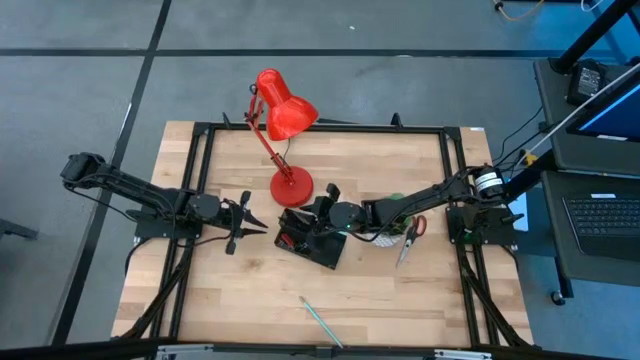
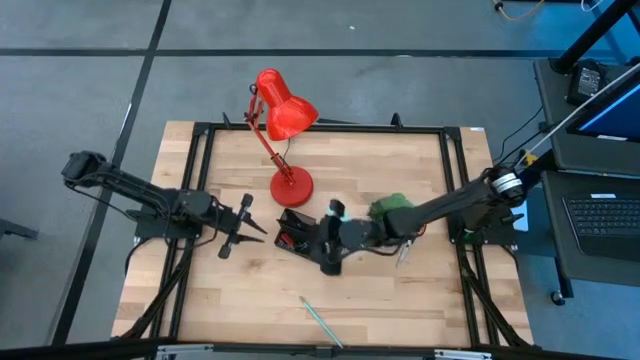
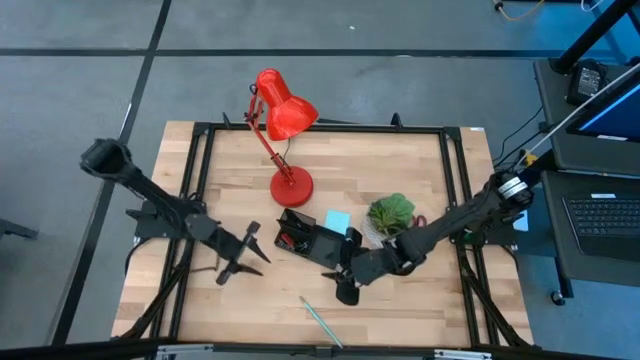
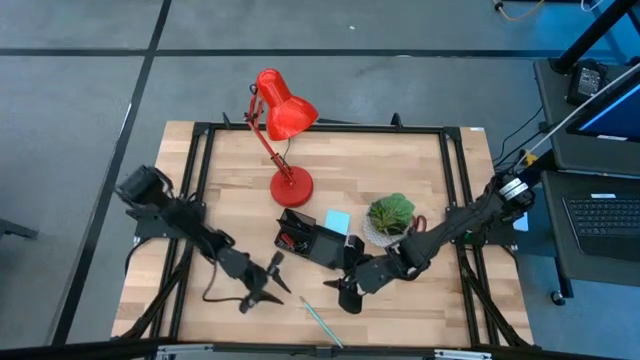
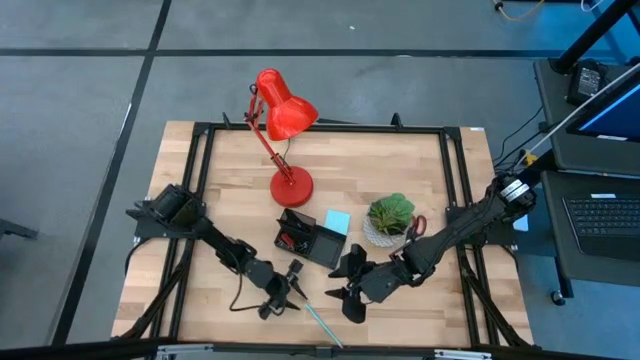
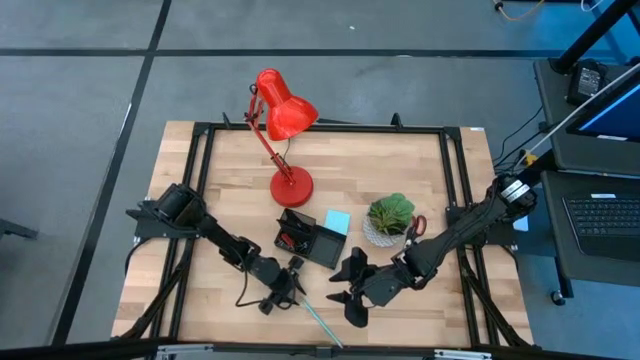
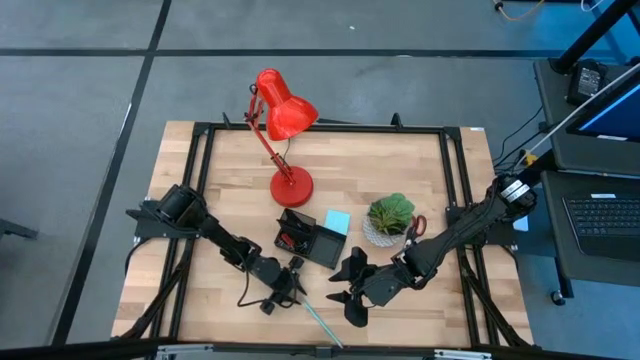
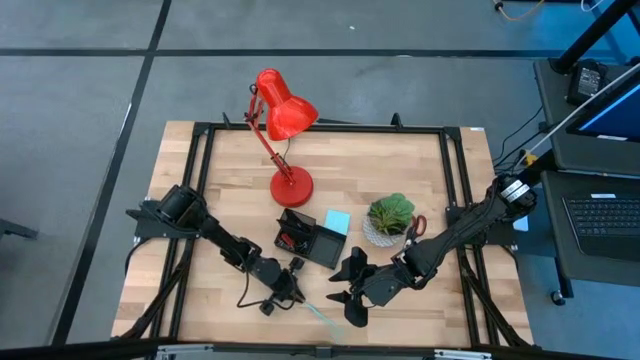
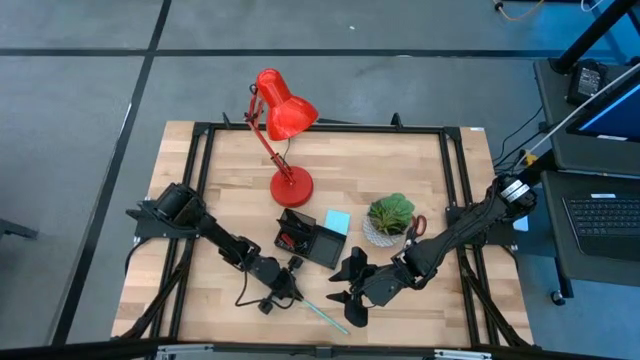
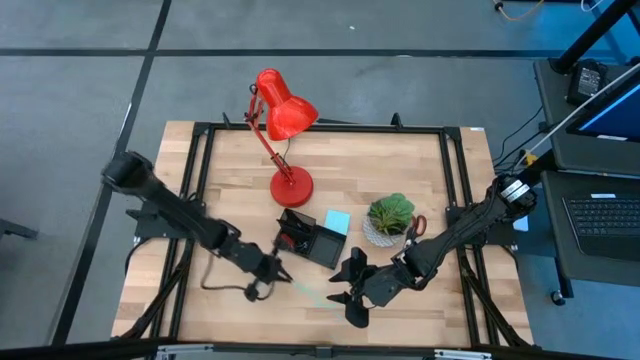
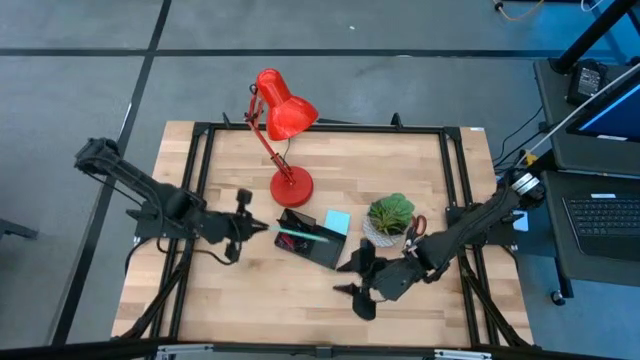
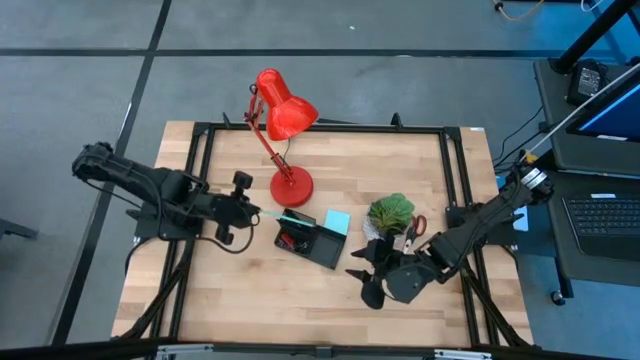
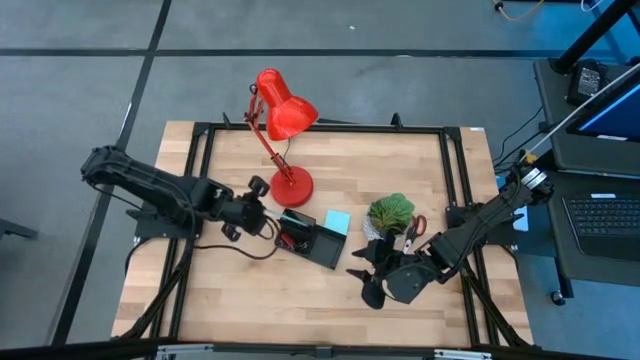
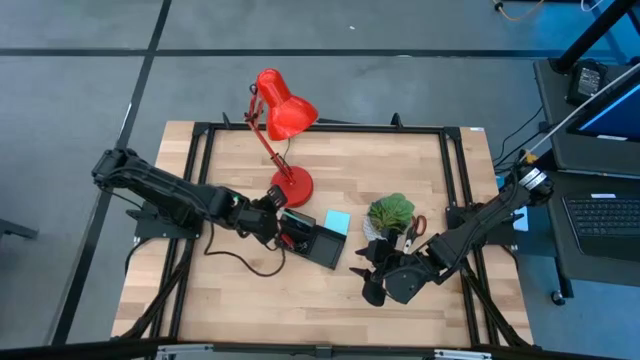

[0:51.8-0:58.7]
Task: Pick and place office supplies into organizer
Put the blue pencil into the black desk organizer

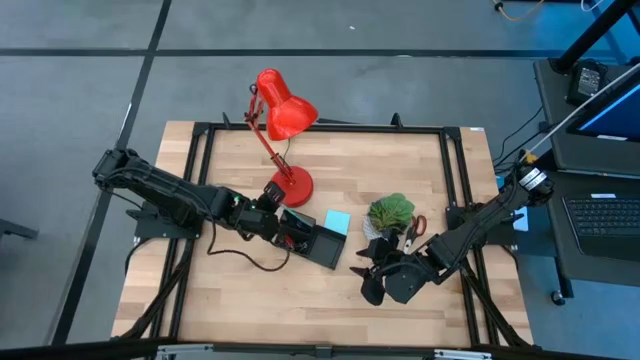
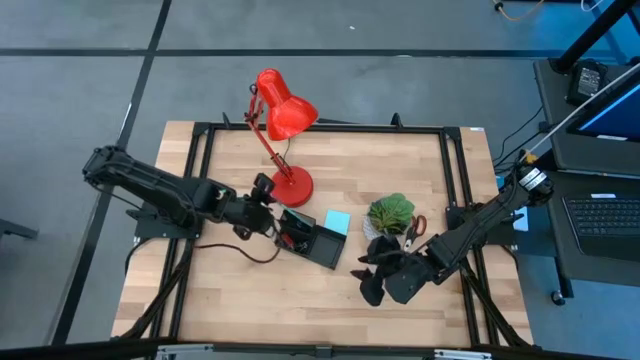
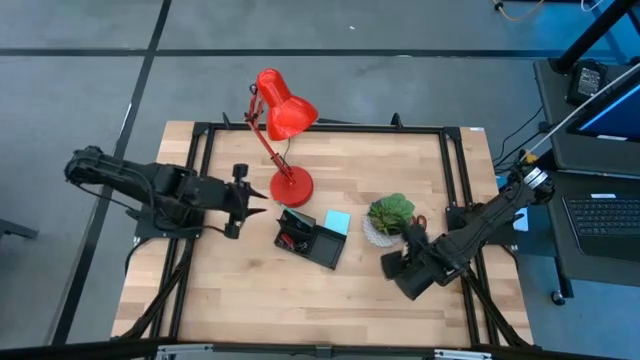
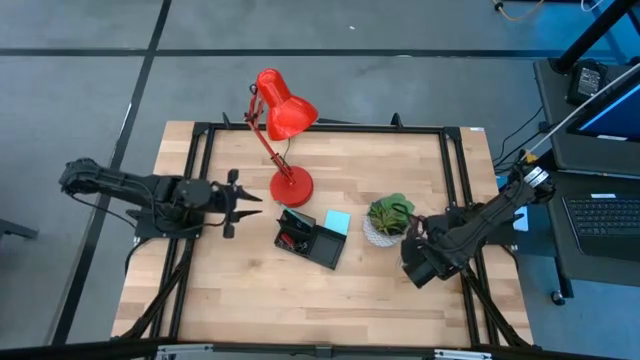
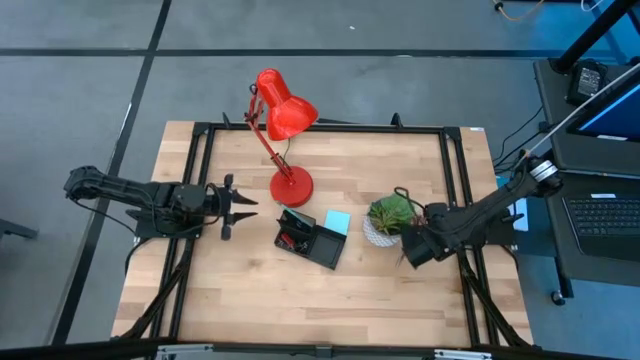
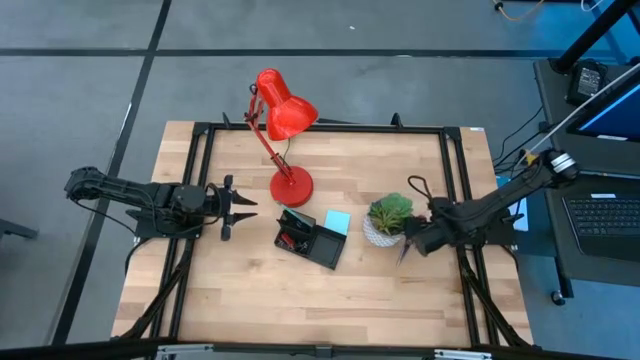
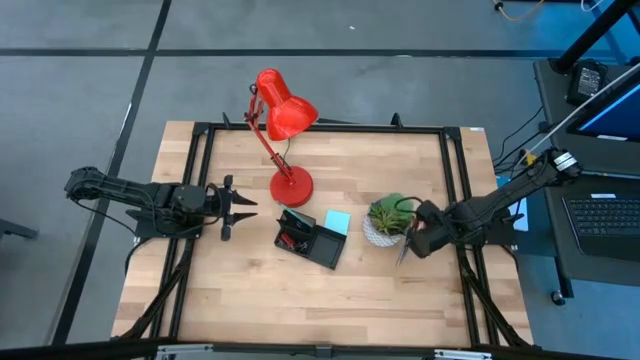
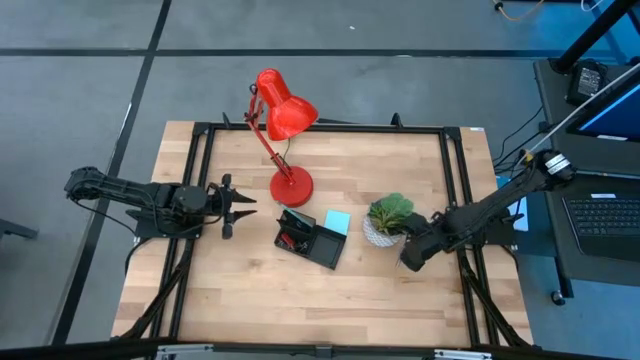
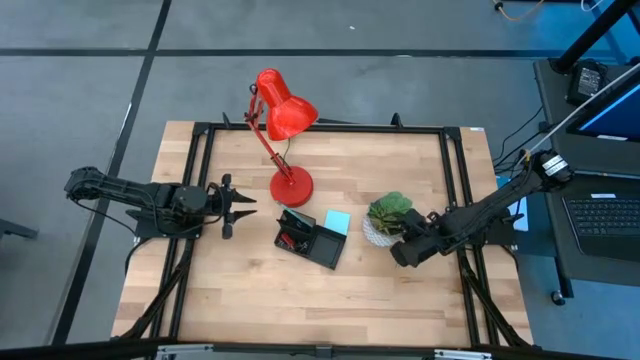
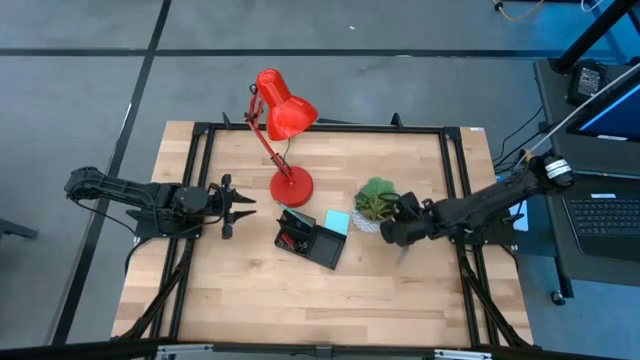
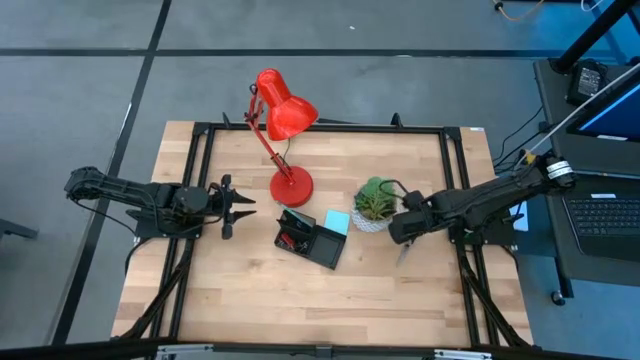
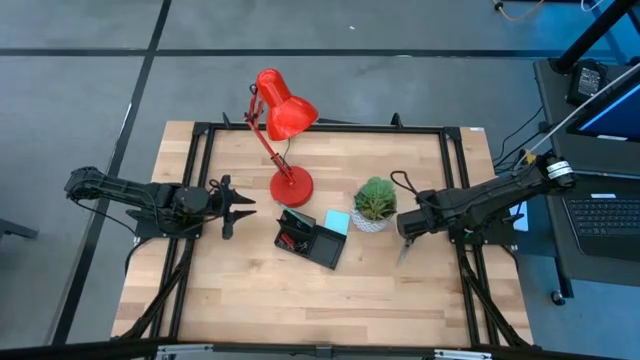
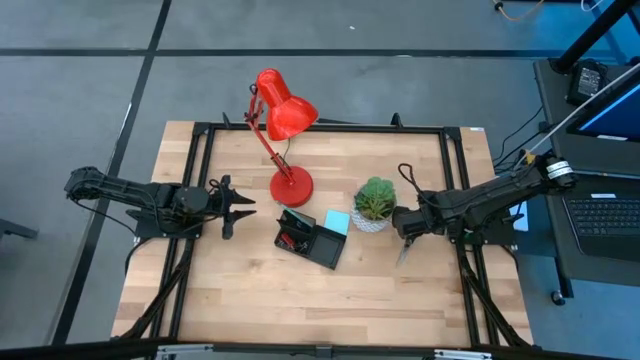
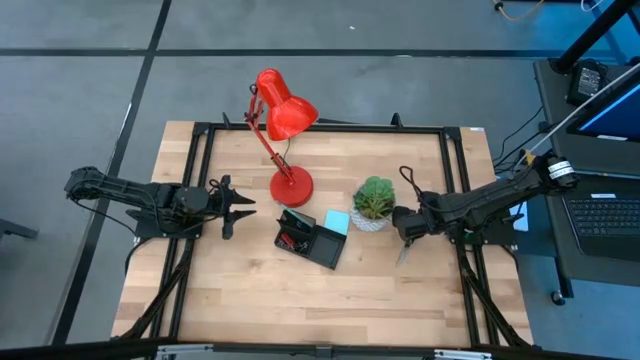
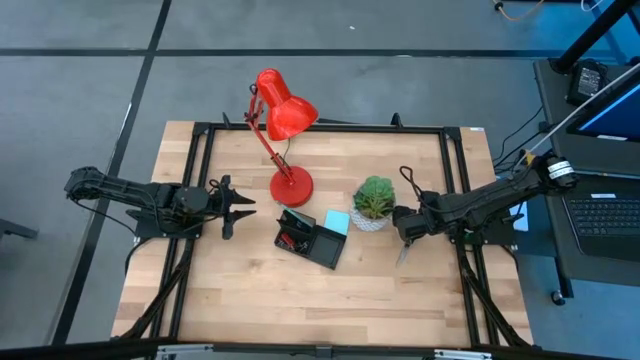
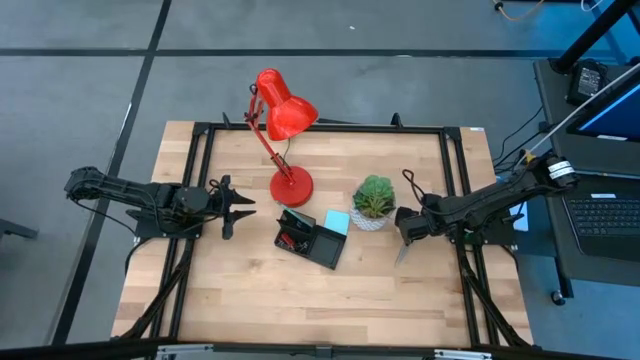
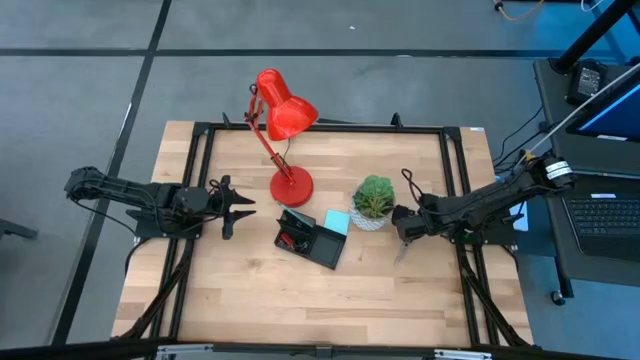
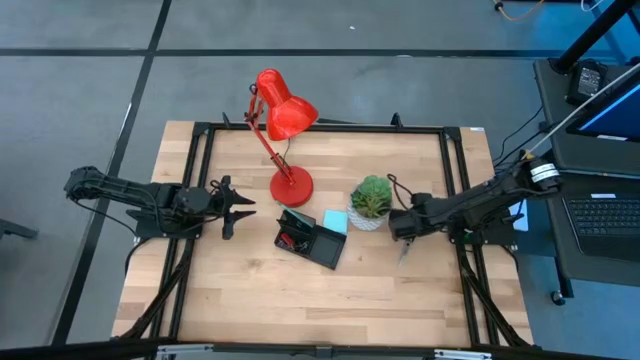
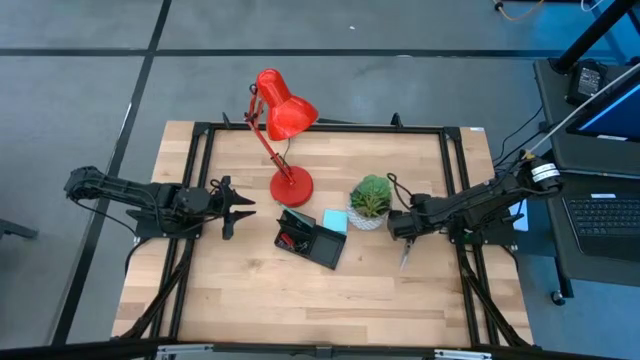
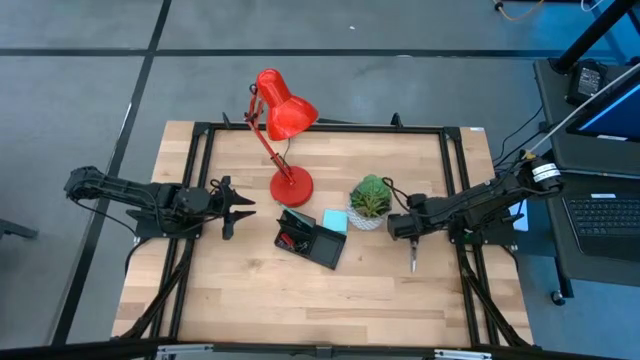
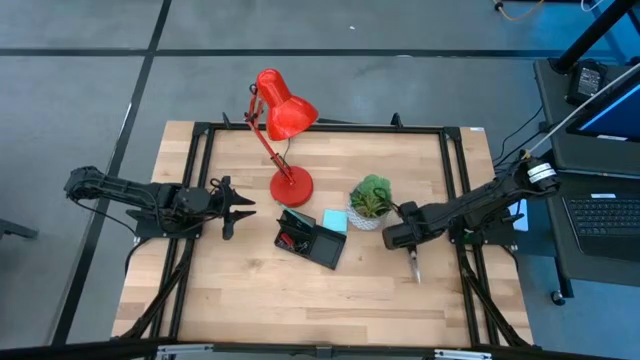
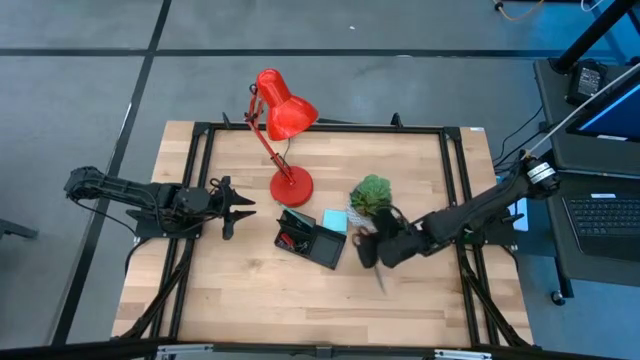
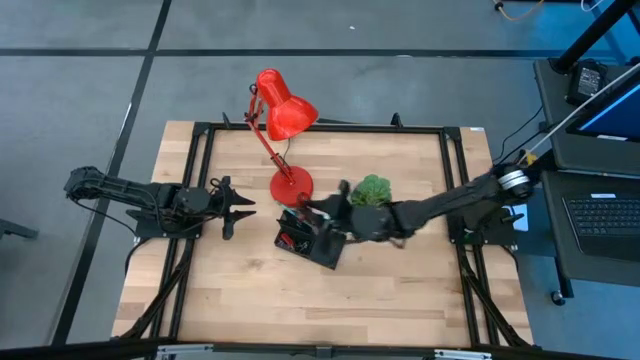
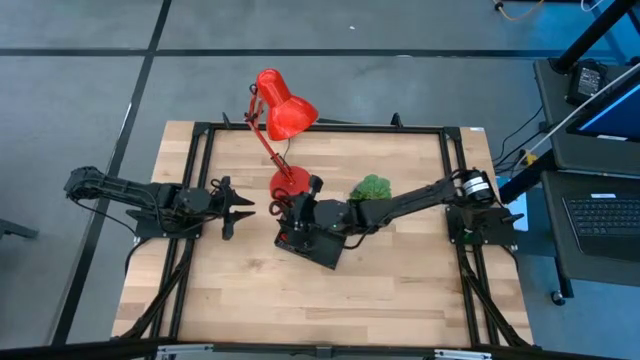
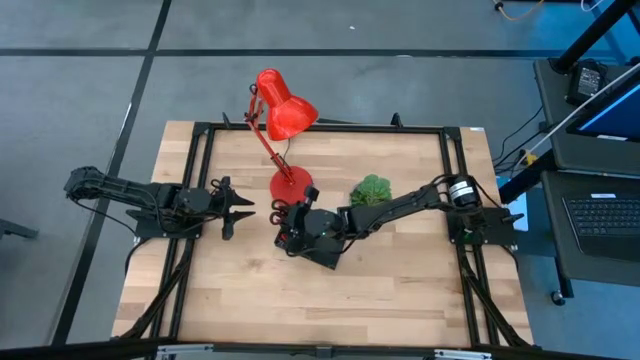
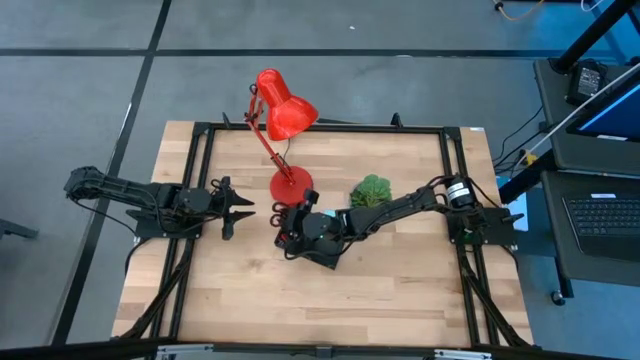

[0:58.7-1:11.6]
Put the black scissors into the black desk organizer

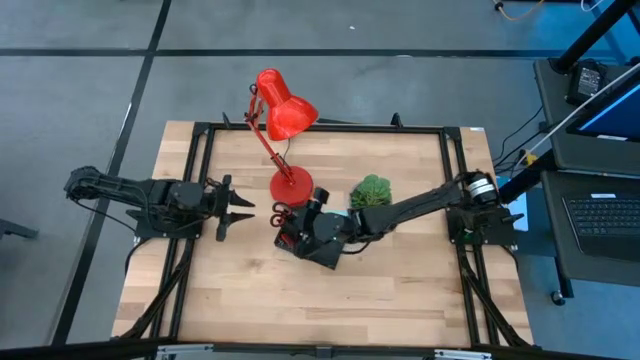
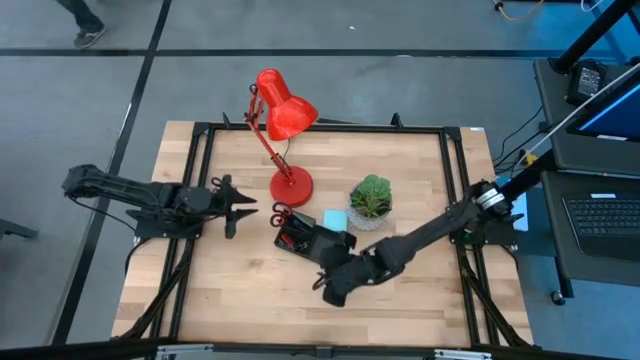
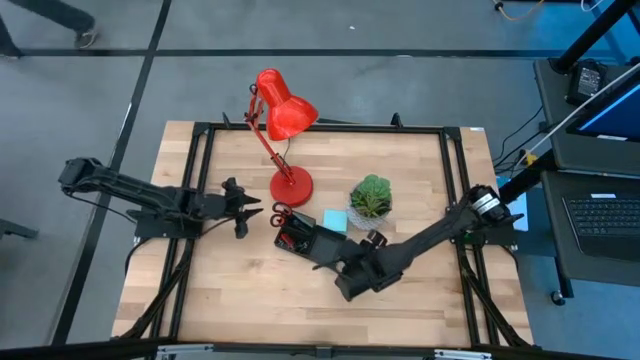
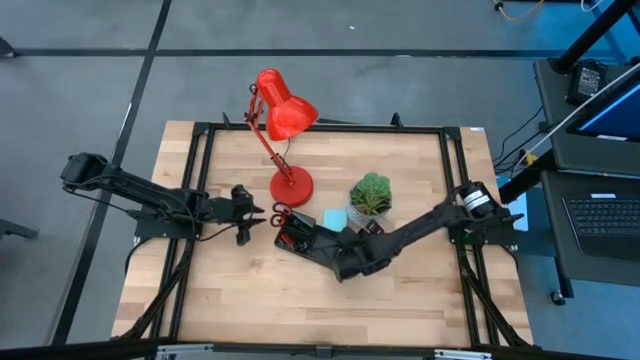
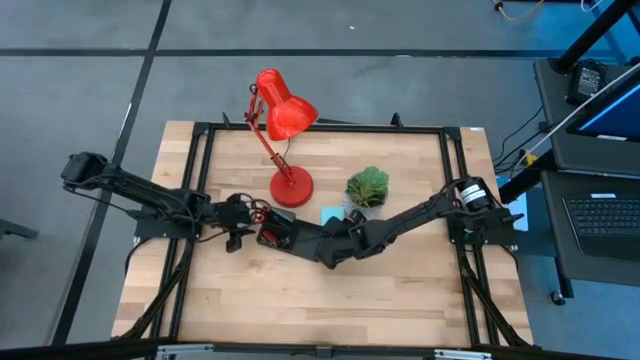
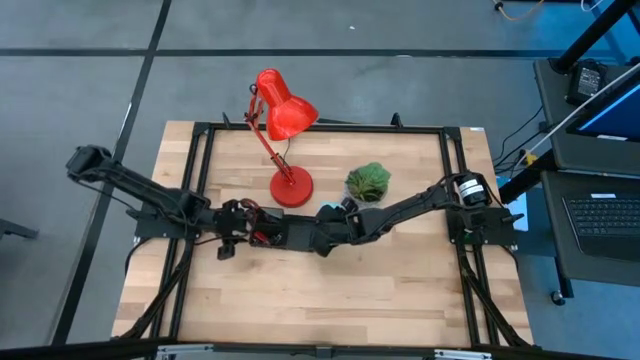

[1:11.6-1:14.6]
Adjust the black desk organizer
